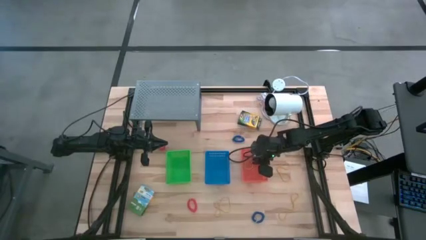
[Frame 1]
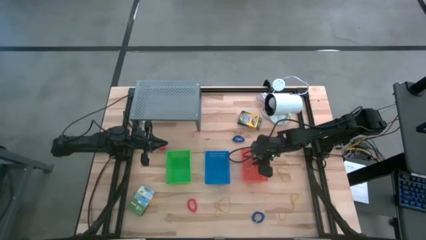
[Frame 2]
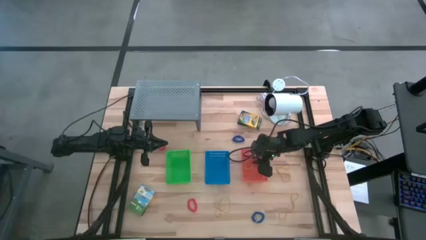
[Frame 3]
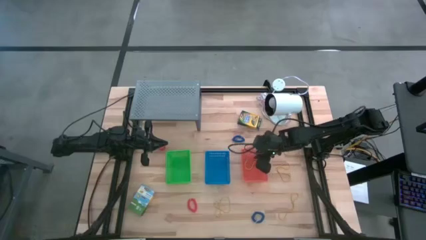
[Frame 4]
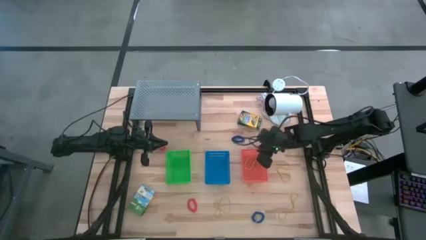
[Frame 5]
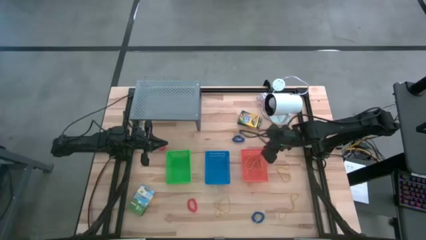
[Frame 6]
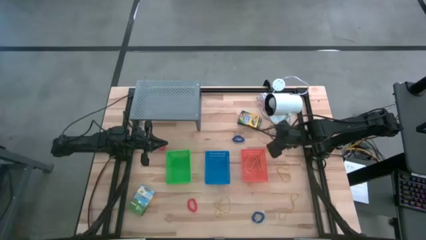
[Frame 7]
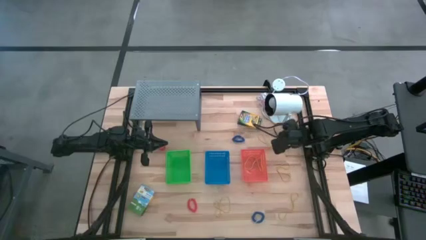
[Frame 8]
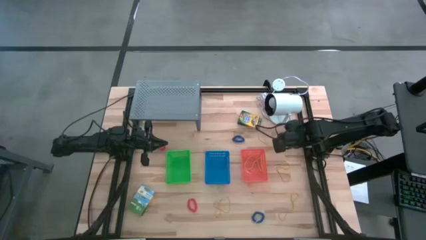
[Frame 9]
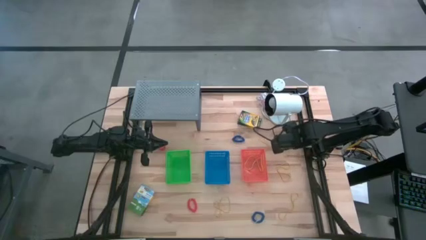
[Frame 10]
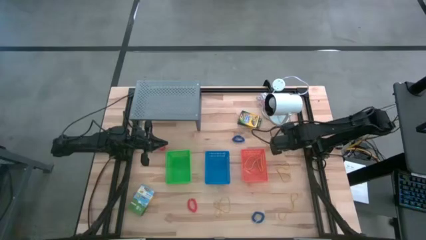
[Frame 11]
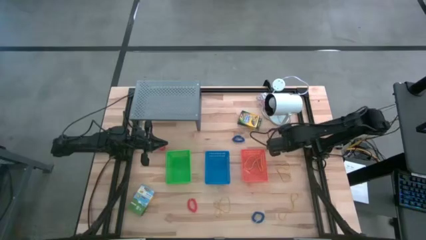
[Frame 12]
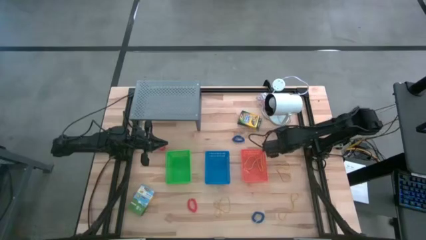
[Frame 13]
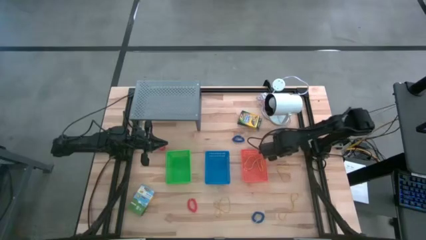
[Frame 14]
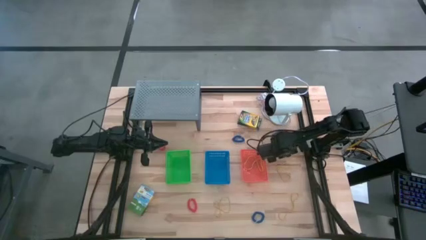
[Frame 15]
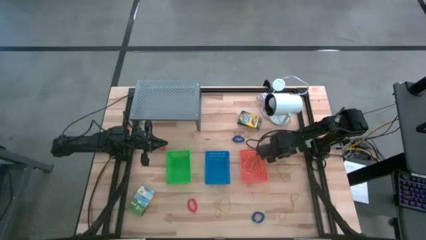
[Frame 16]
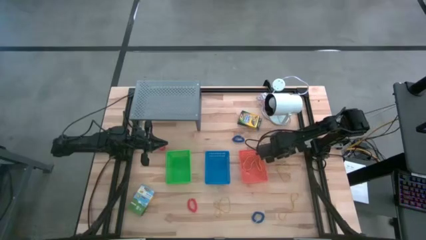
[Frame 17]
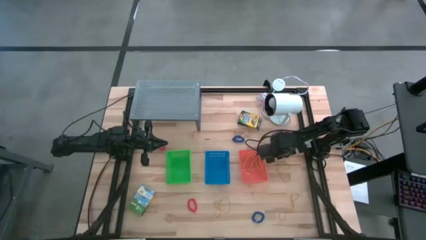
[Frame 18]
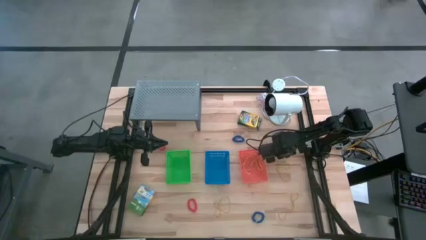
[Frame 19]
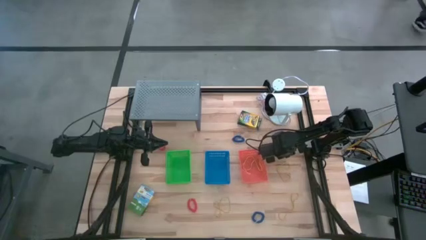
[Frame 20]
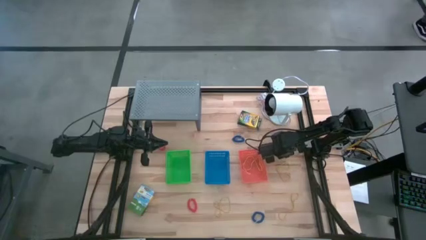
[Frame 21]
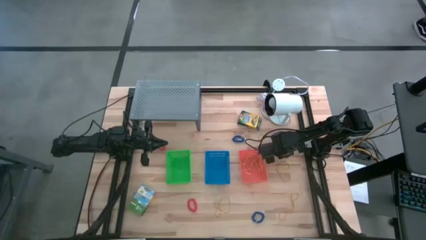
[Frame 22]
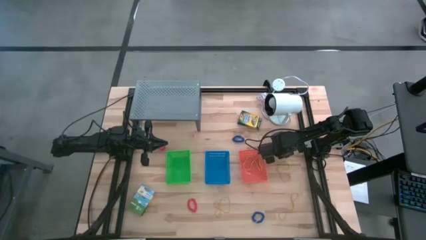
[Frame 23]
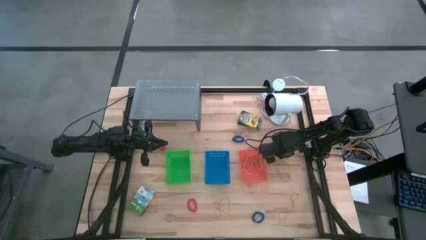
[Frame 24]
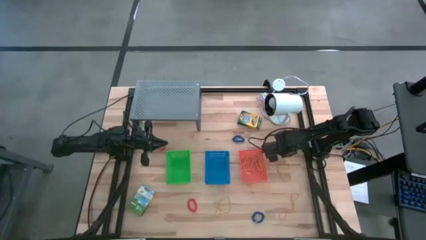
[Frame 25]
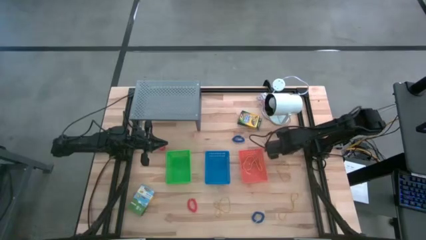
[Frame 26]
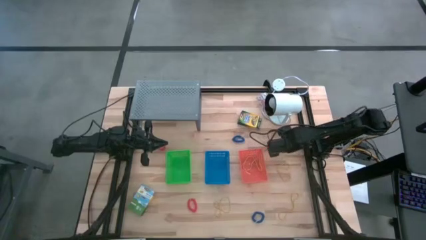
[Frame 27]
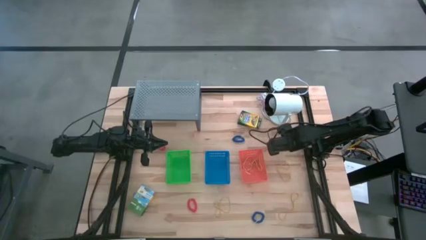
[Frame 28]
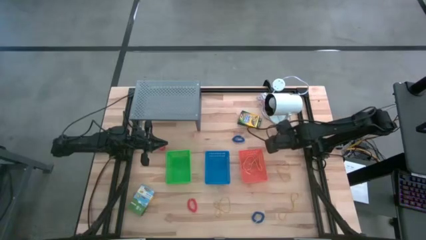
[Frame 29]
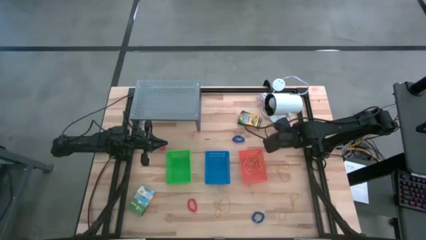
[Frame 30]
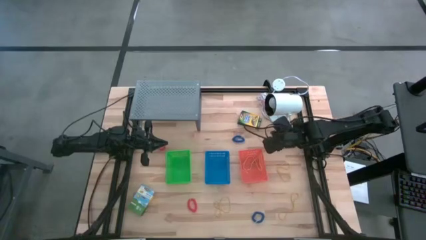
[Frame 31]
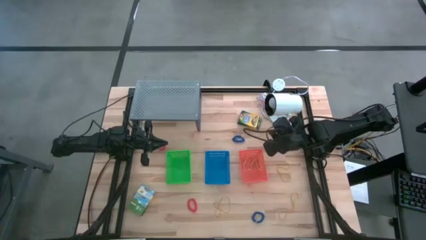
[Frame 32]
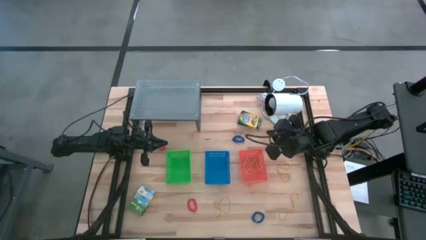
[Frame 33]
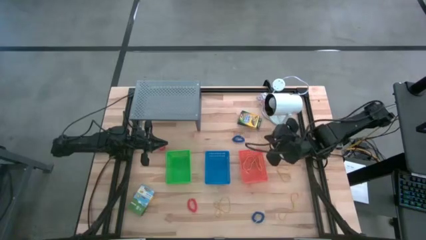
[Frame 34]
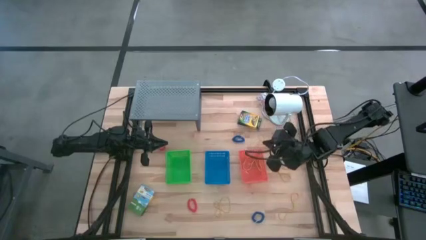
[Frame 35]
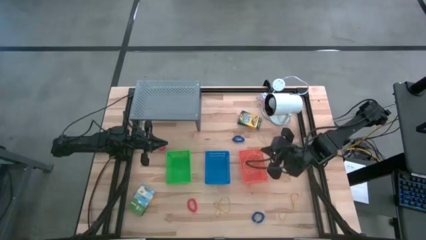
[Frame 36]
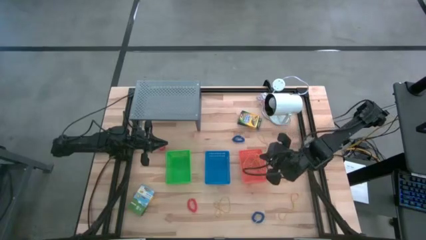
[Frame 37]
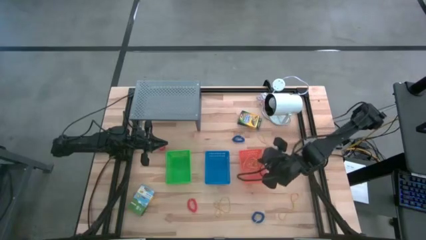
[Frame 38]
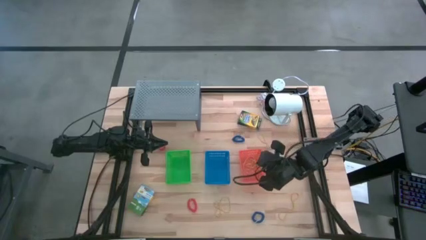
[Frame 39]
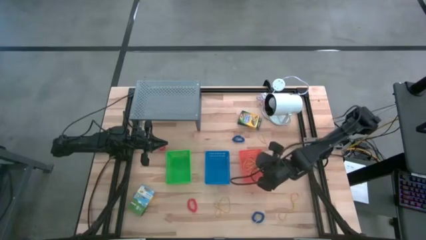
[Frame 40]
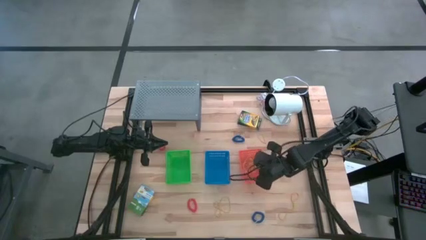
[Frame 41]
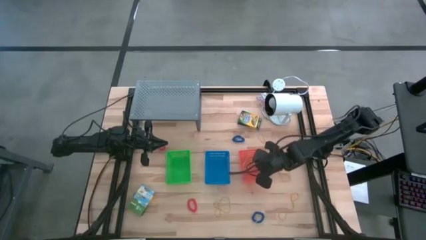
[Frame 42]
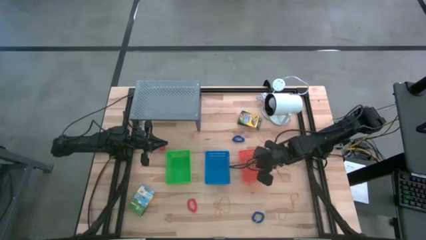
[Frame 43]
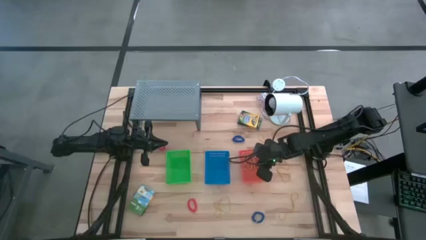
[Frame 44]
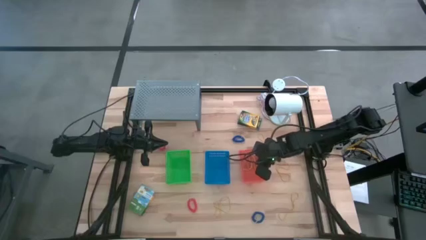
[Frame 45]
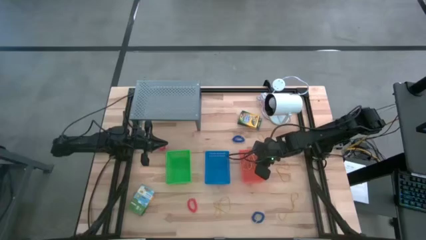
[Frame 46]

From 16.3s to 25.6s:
Task: Pick & Place Office Desk Supplies
Put the yellow rubber band into the orange bin

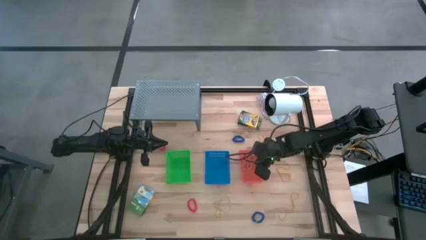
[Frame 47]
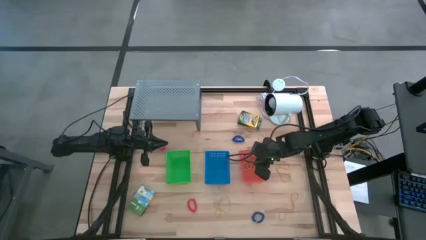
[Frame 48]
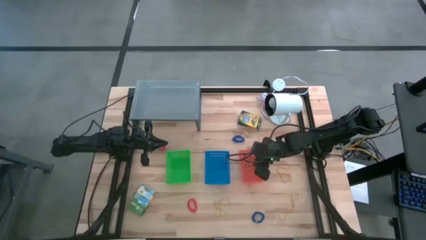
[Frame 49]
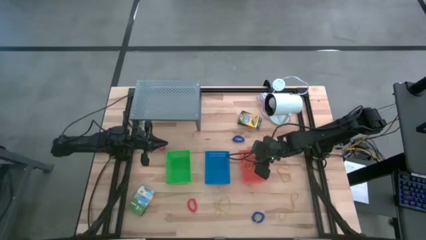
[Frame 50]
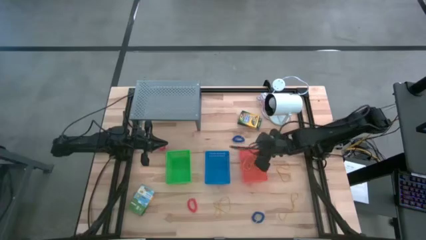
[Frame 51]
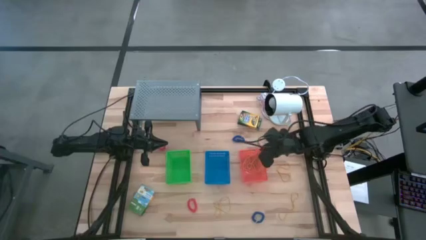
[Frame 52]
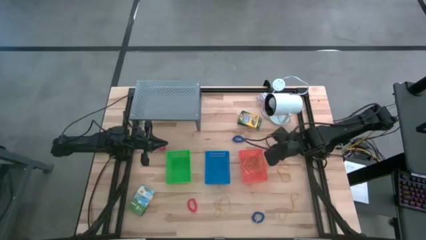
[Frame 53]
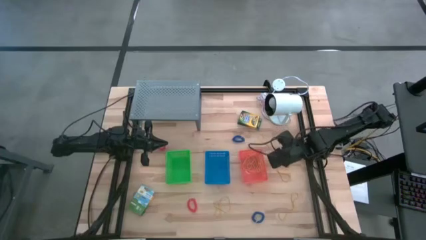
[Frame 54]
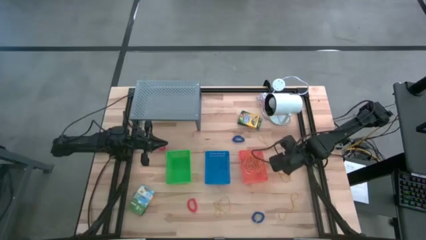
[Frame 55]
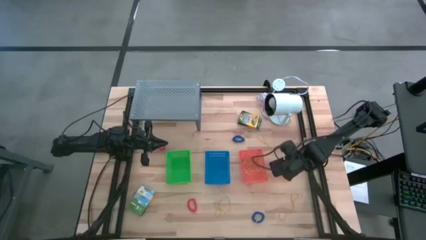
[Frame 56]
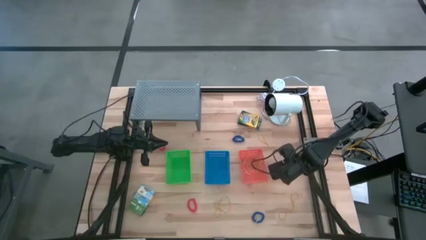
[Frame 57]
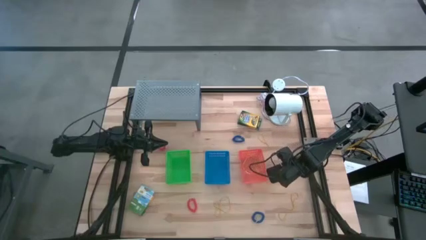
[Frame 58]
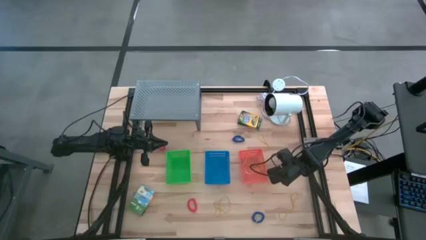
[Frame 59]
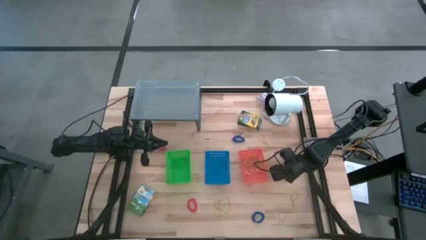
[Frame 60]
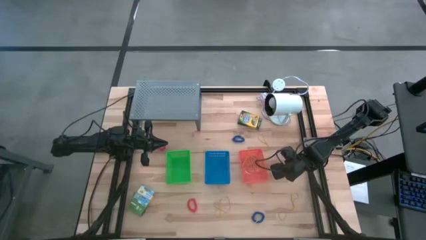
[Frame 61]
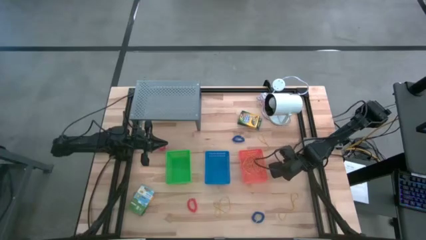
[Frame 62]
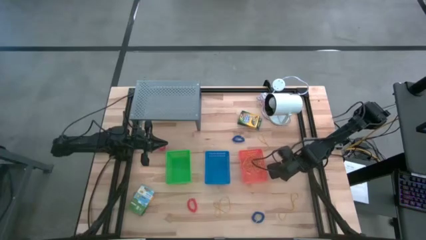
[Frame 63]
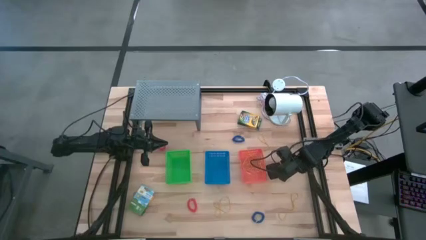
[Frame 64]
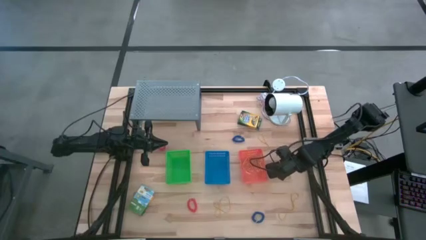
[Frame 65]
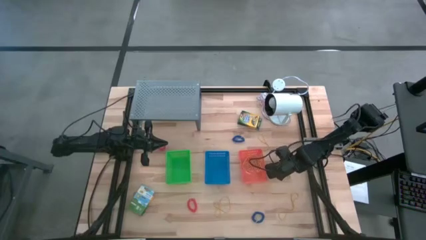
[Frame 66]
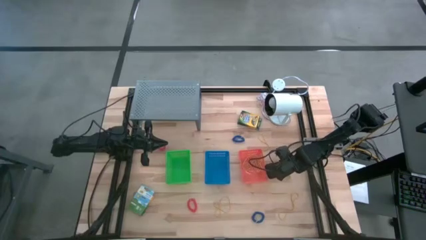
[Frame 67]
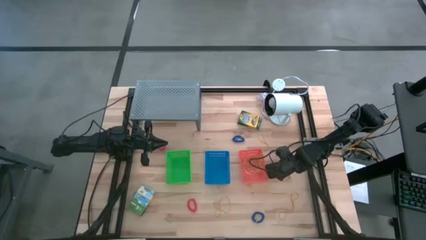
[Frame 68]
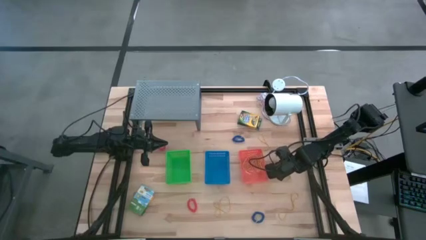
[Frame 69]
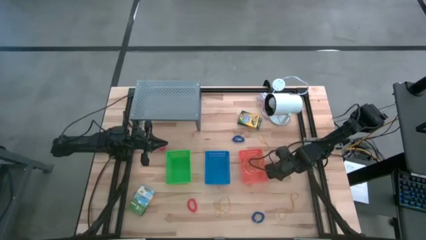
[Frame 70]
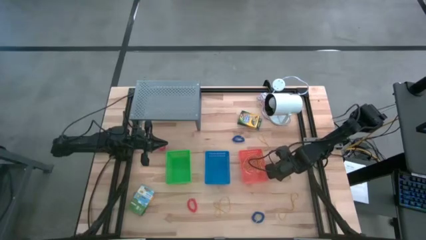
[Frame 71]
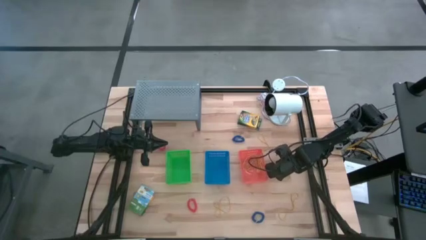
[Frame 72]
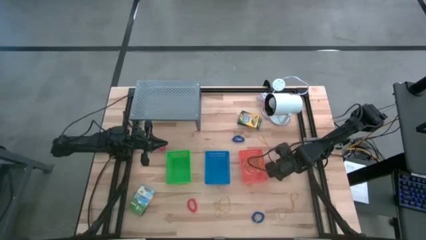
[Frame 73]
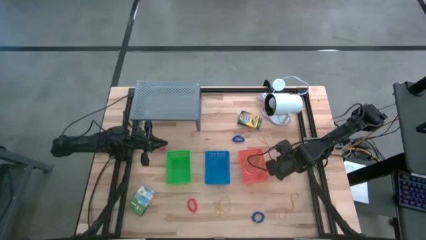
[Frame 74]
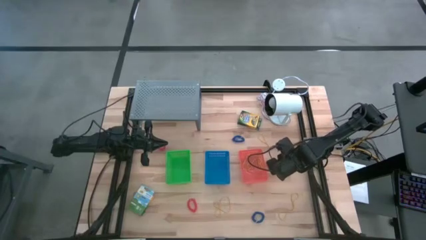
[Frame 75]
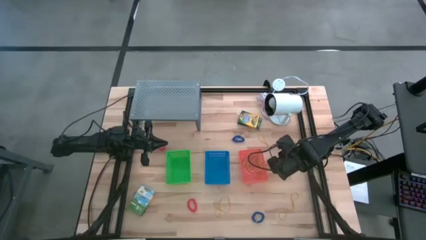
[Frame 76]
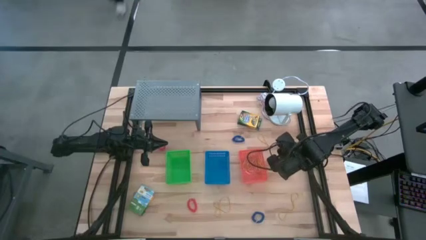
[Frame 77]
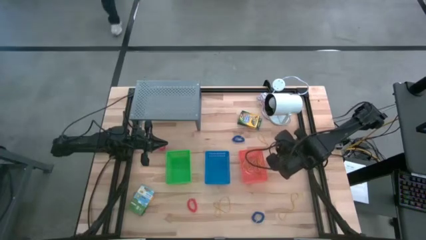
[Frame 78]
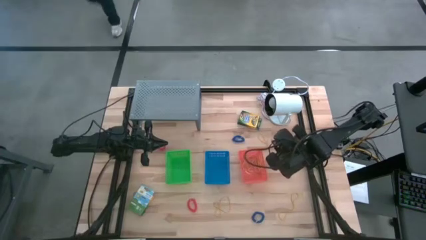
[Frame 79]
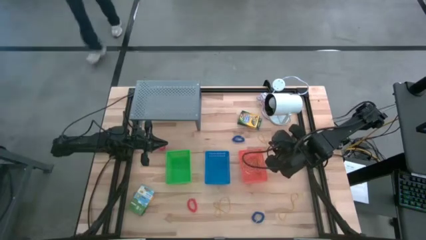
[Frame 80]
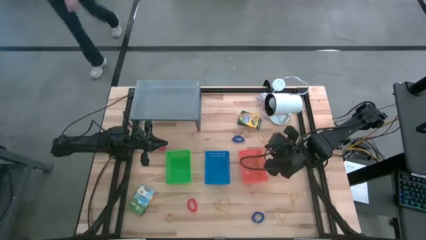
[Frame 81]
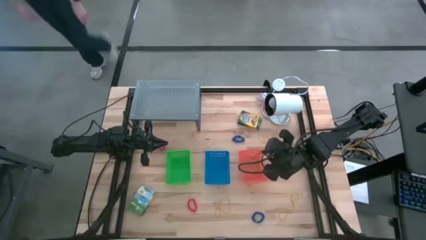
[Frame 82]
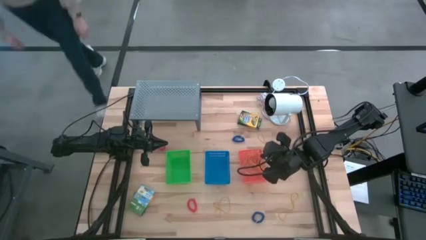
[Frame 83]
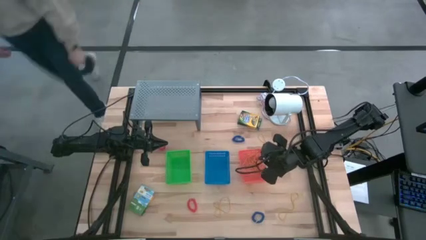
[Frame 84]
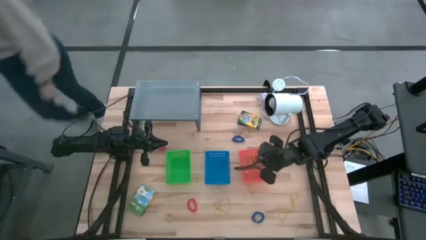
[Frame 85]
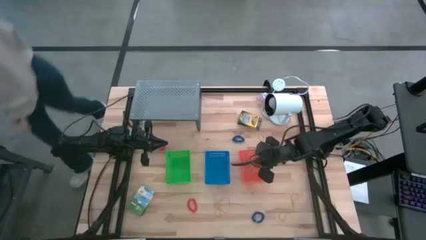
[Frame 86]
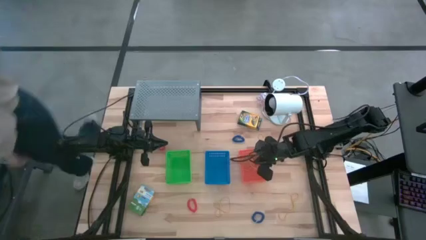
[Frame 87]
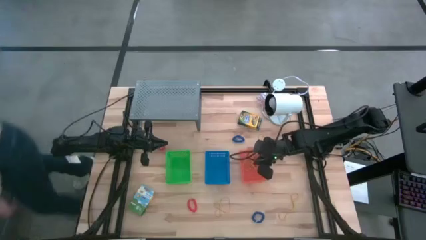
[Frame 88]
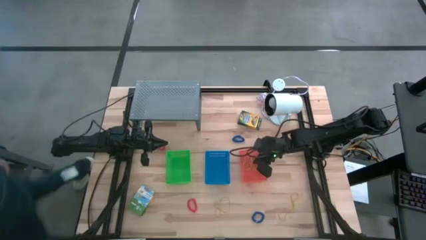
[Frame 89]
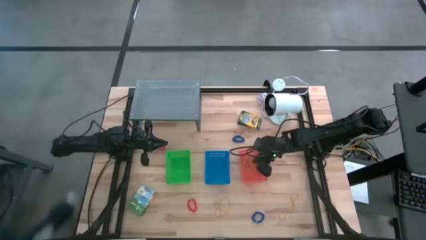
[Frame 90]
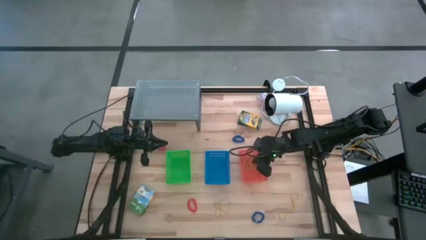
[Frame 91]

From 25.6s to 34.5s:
Put the yellow rubber band into the orange bin
